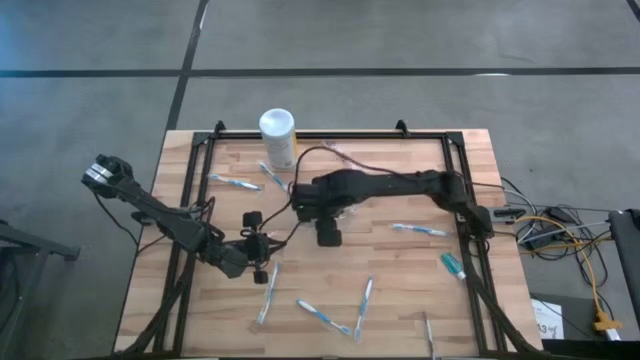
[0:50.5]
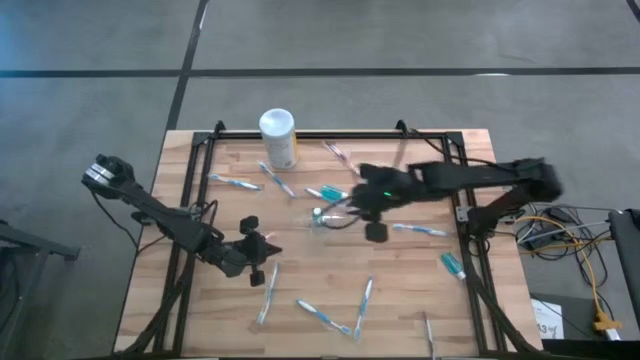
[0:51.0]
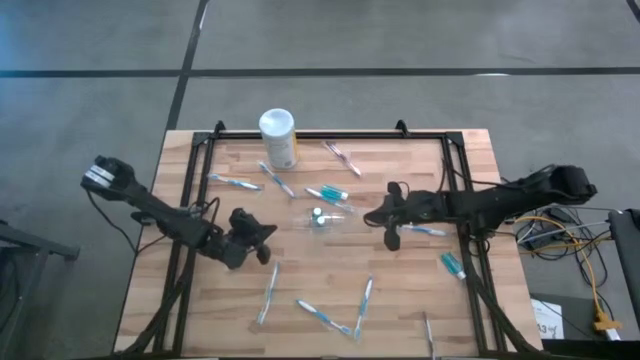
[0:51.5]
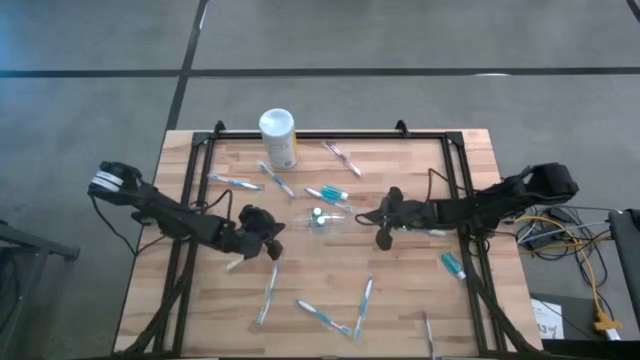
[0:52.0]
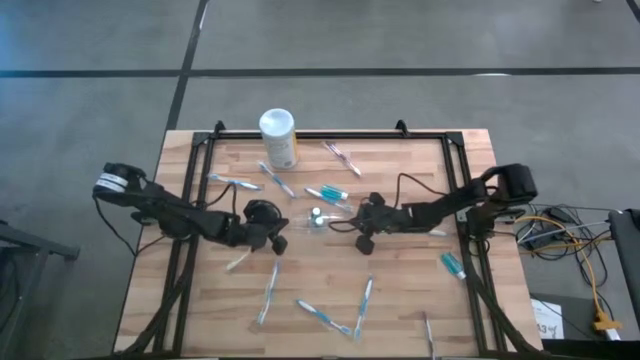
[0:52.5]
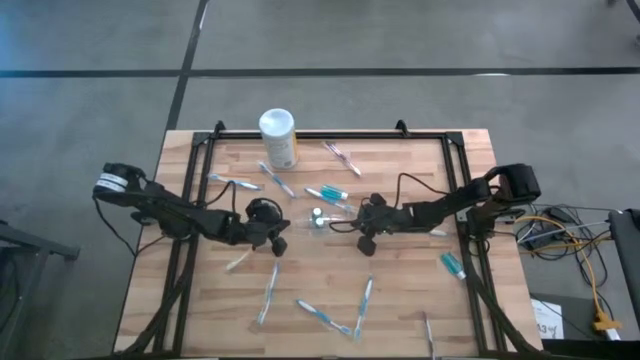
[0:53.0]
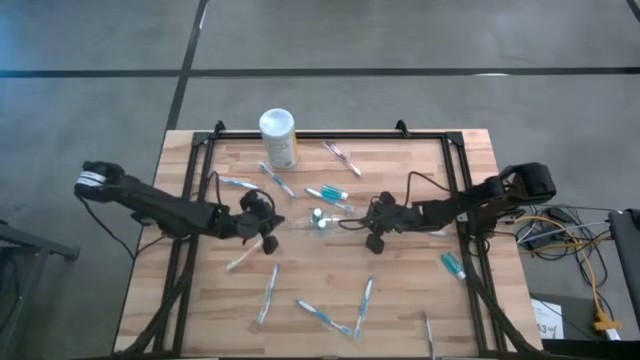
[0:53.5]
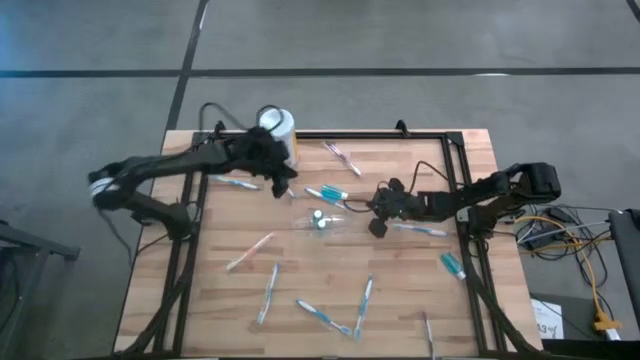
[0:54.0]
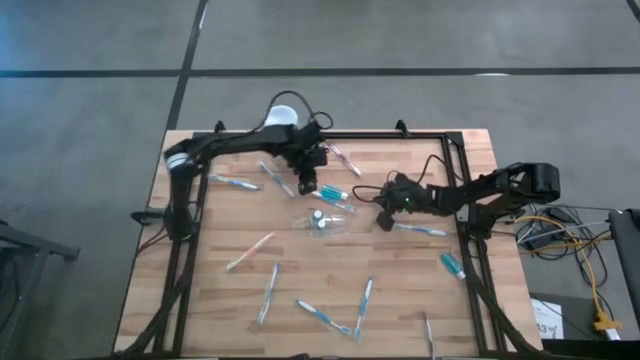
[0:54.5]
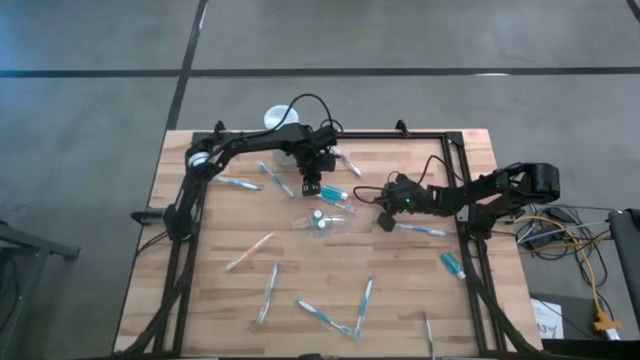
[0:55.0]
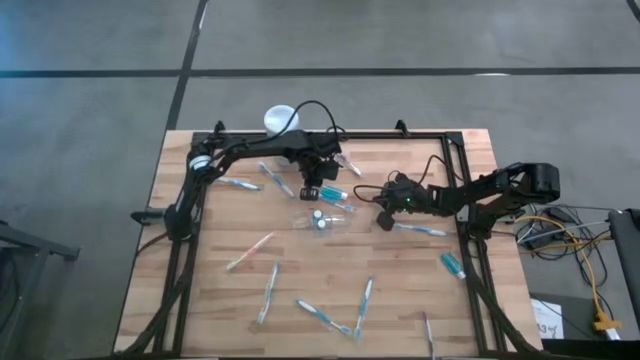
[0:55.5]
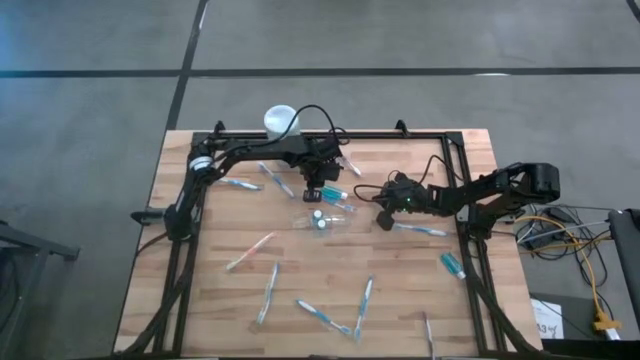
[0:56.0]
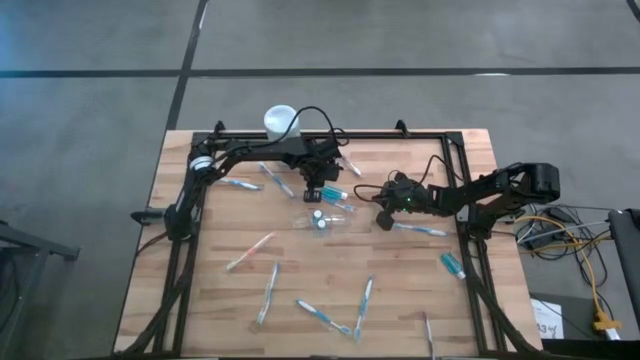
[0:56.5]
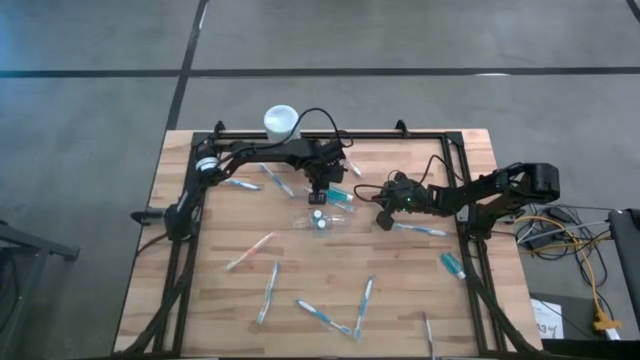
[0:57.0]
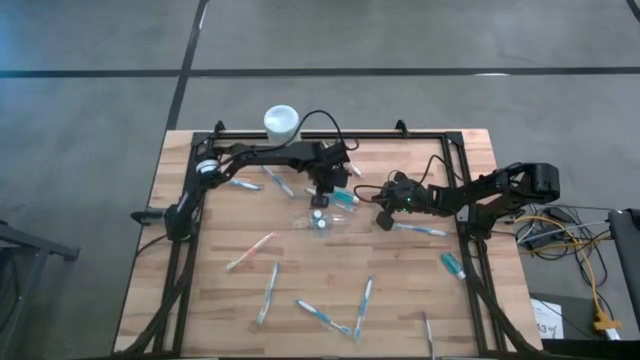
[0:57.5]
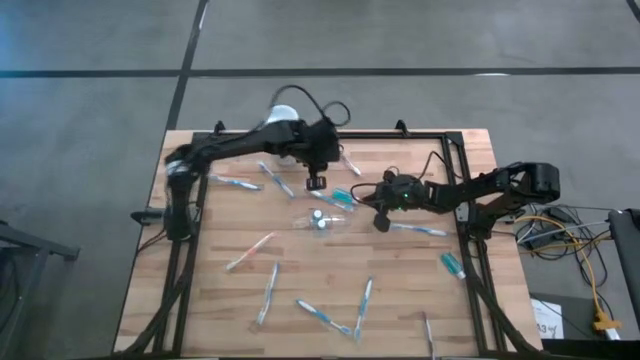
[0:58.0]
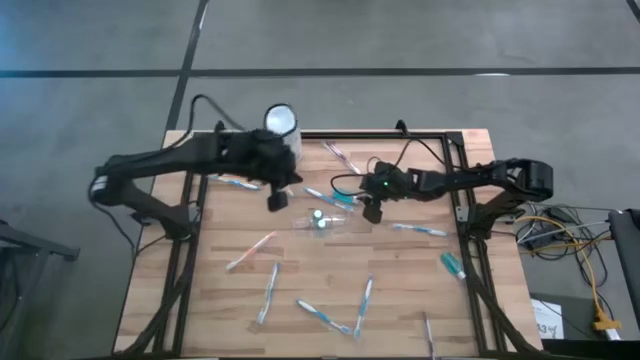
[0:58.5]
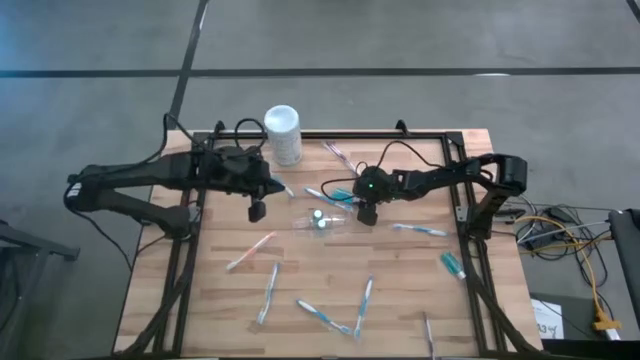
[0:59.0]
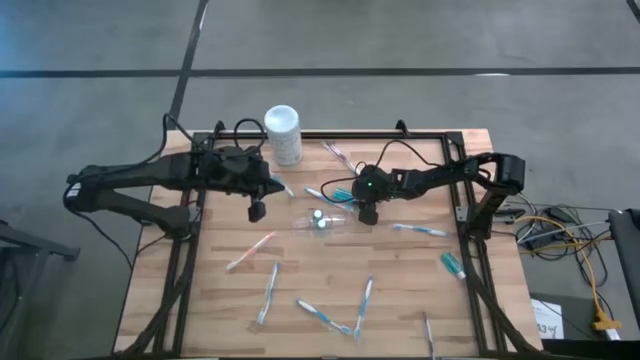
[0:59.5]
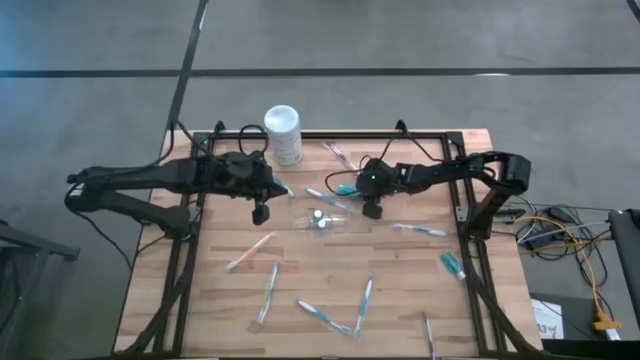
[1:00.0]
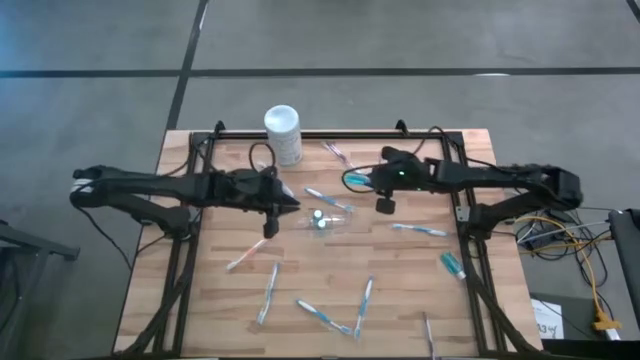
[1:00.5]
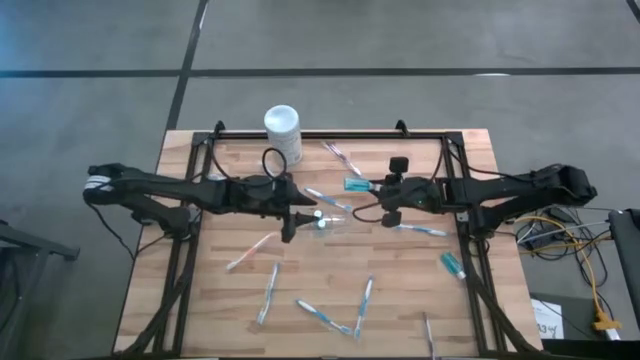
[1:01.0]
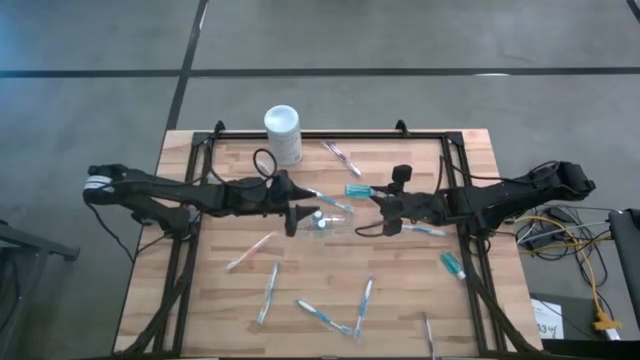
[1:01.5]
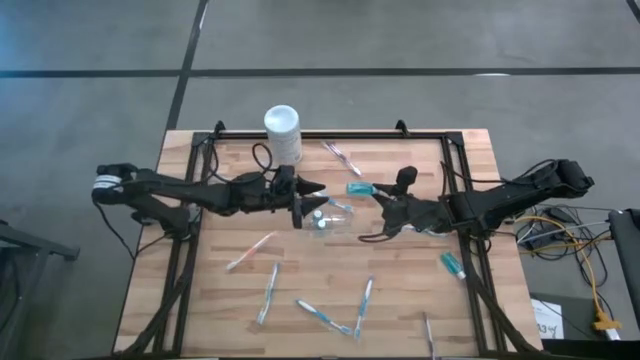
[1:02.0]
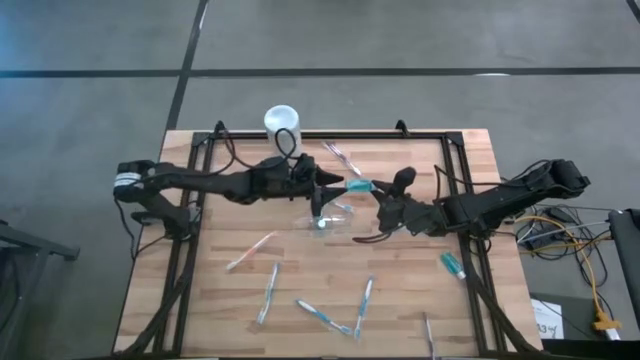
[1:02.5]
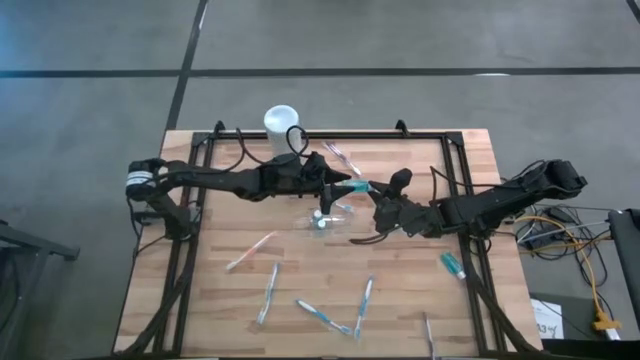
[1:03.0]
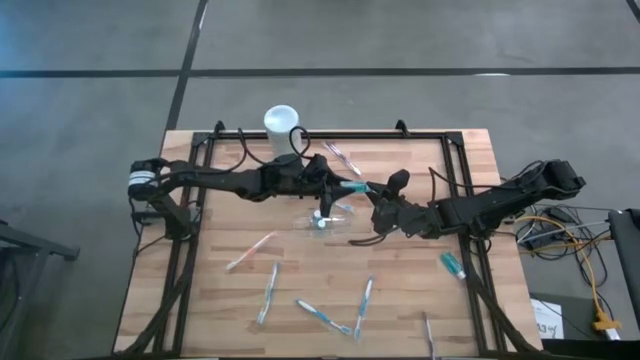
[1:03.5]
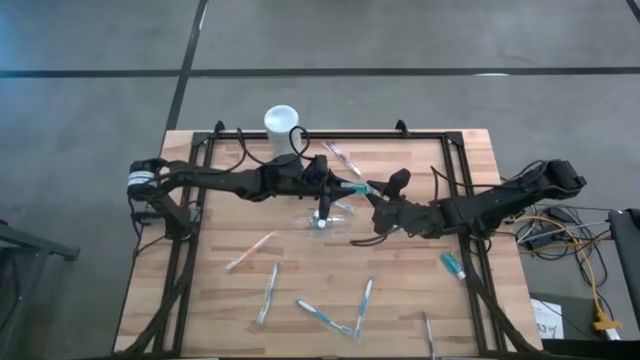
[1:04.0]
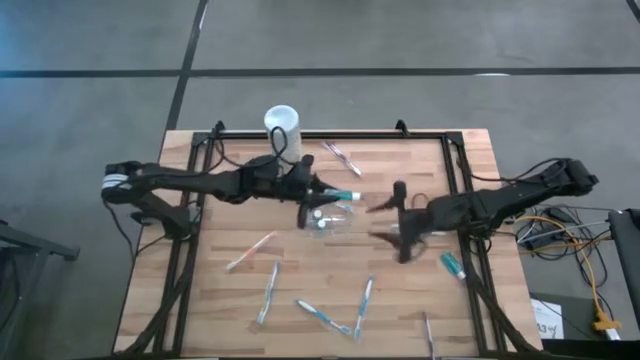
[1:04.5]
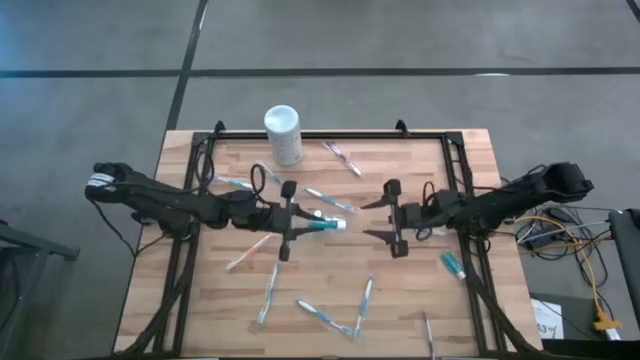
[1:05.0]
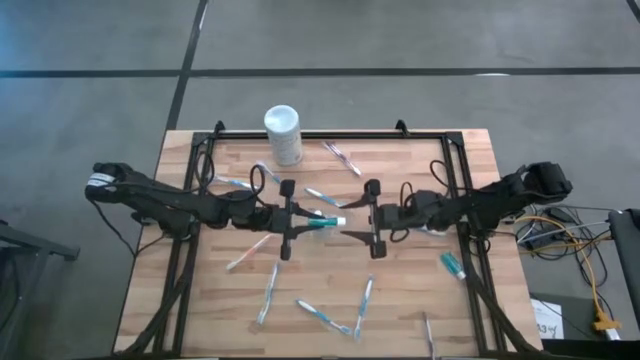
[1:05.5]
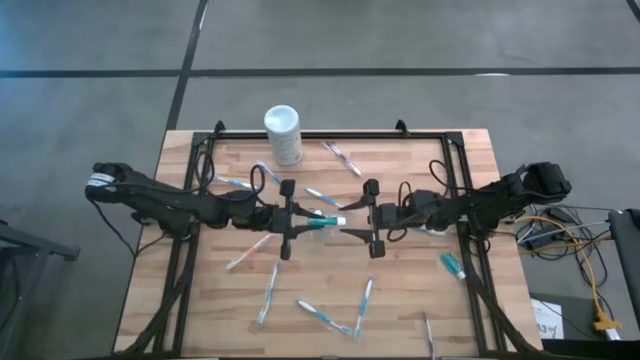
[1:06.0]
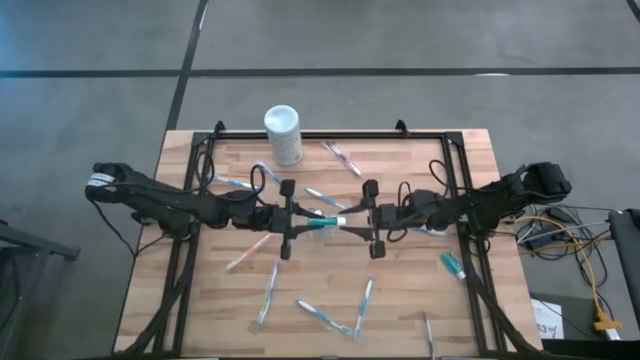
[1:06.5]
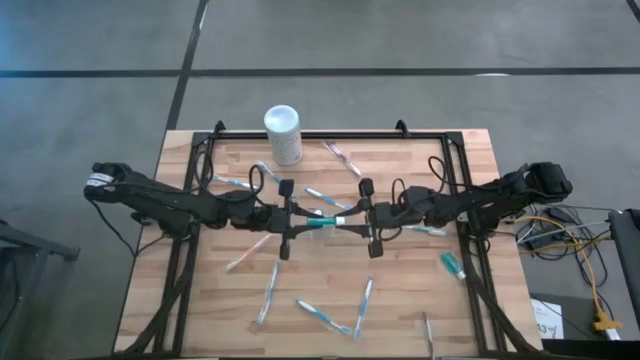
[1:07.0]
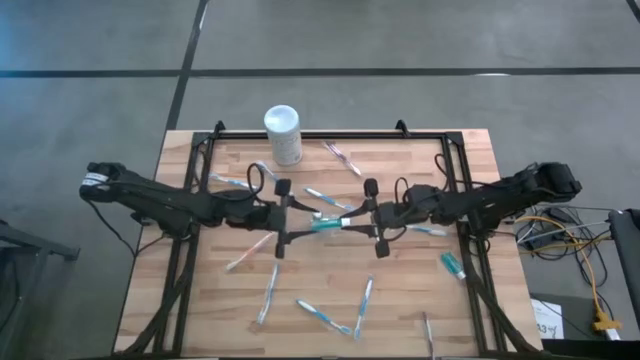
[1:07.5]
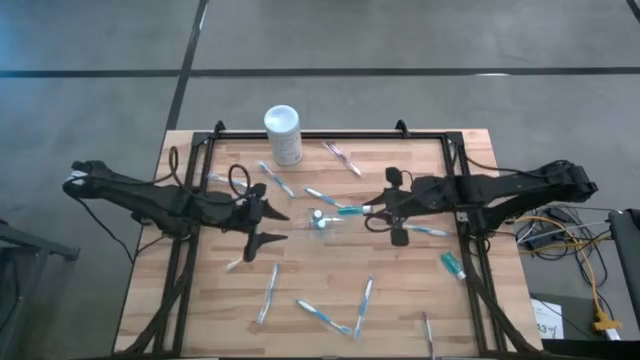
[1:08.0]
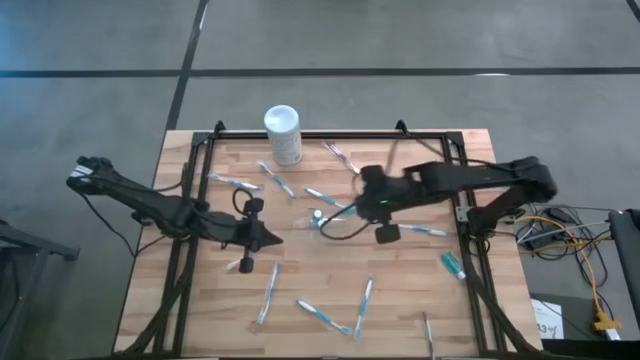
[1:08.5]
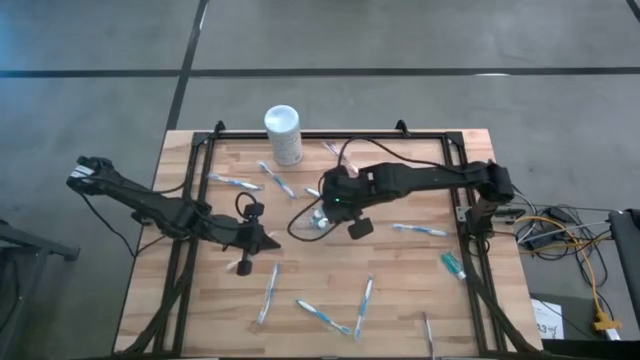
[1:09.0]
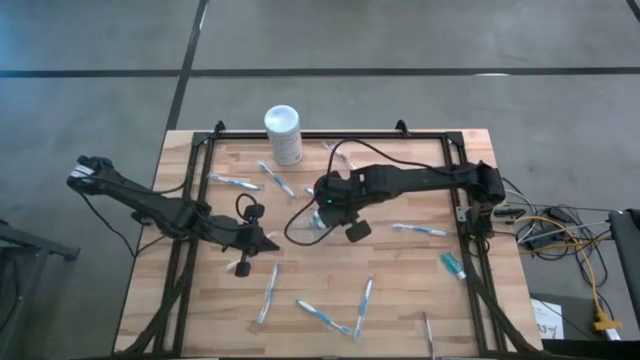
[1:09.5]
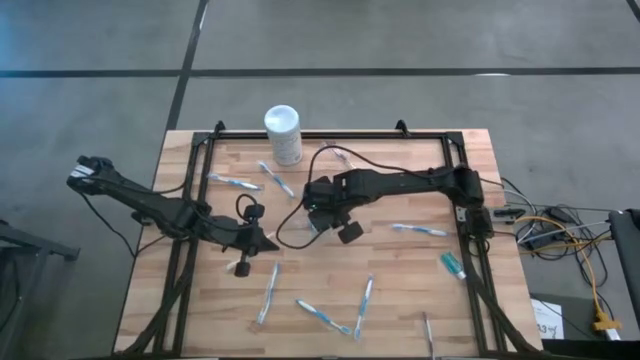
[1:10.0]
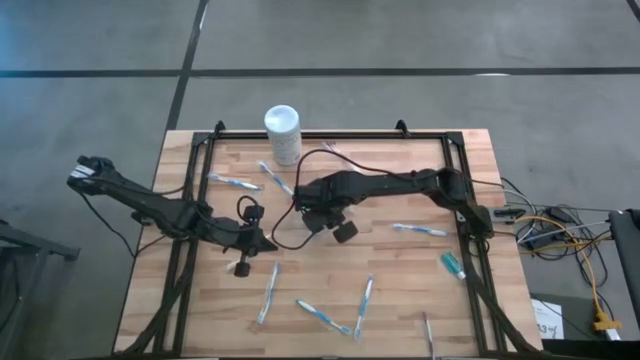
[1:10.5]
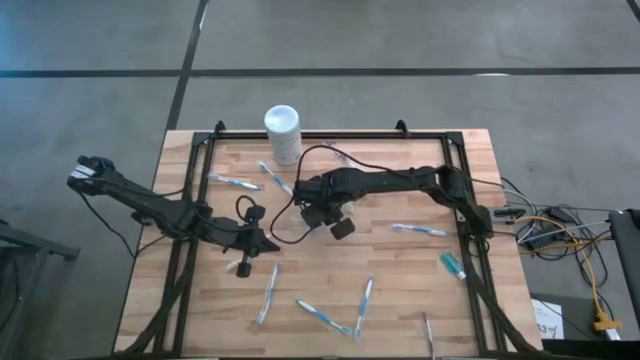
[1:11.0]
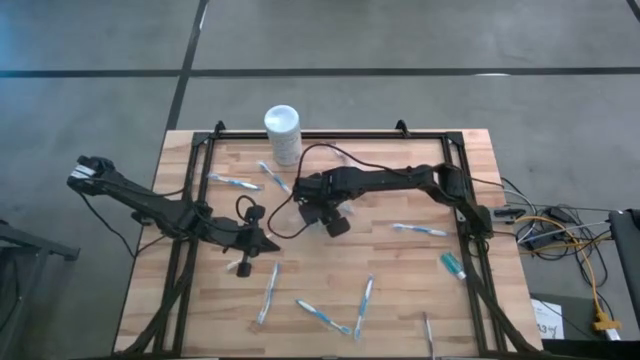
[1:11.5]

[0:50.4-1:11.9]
Task: Pick & Place toothbrushing station
Put the blue mouthwash into the transparent organizer

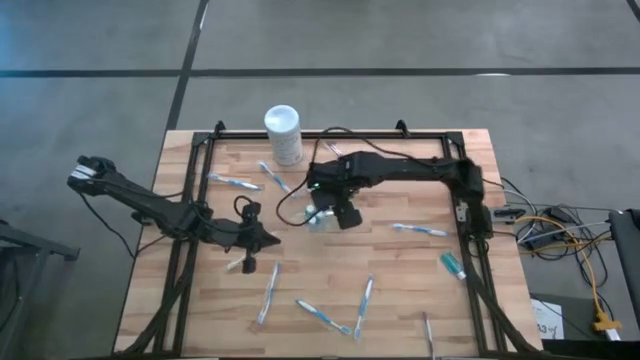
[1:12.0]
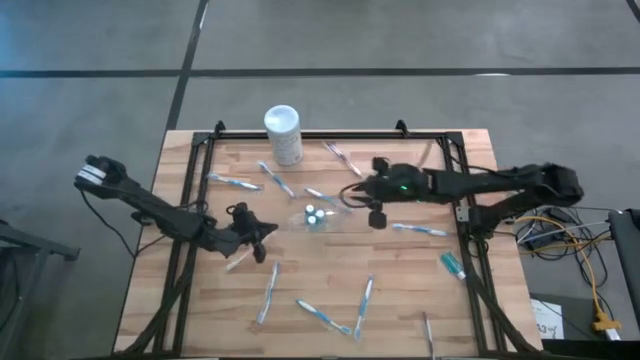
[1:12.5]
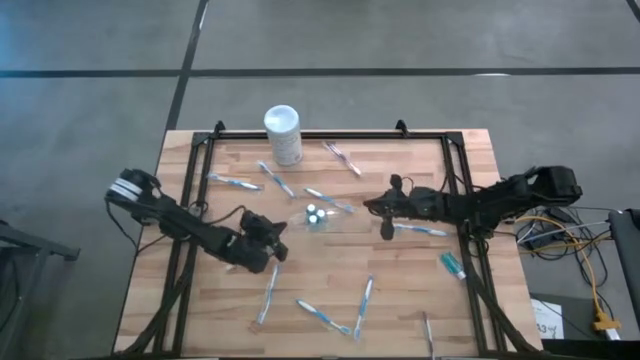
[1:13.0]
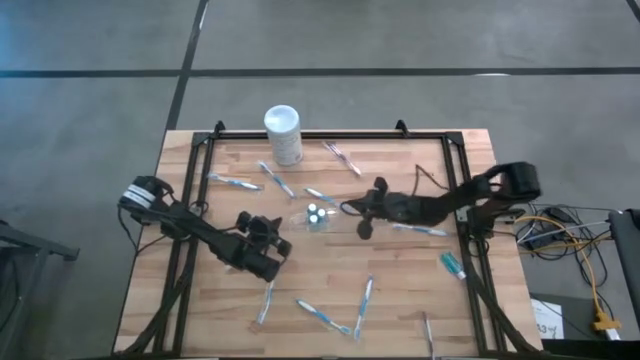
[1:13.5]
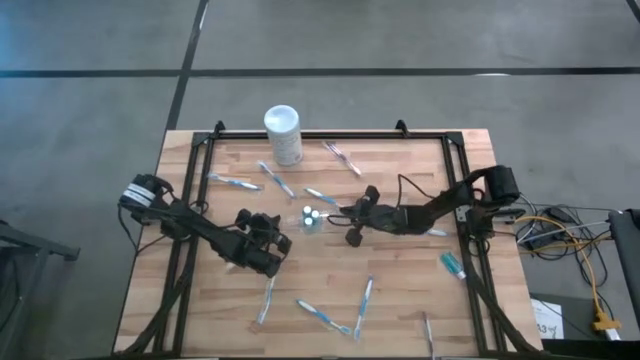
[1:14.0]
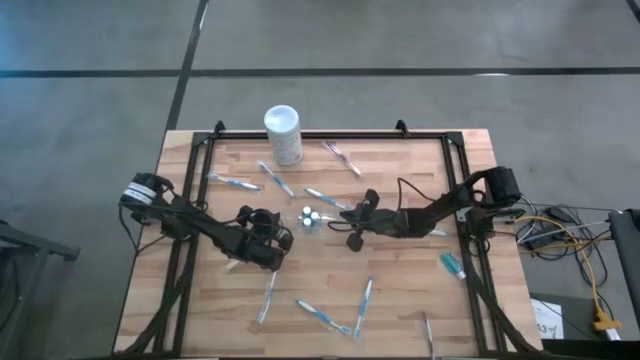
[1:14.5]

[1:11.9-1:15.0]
Adjust the transparent organizer
